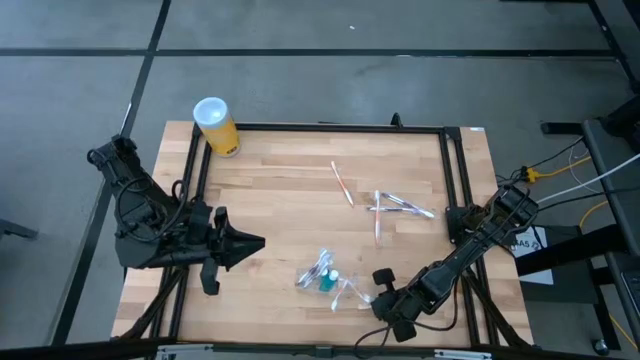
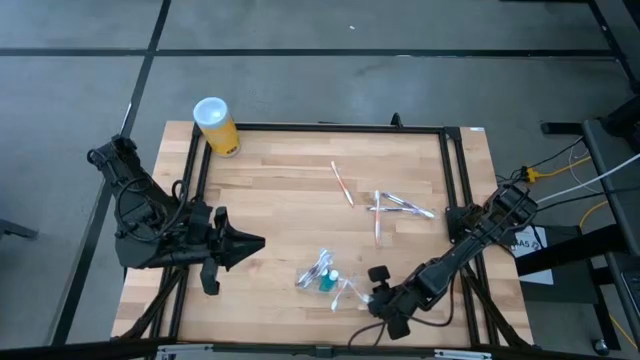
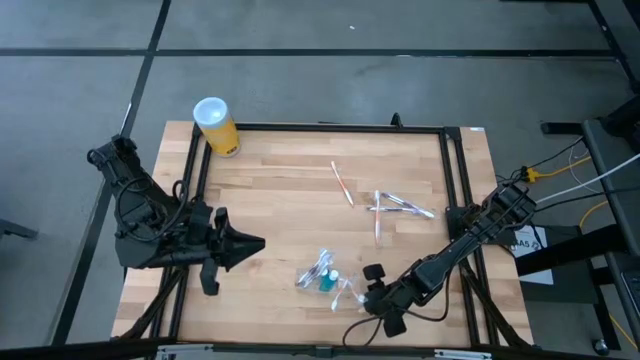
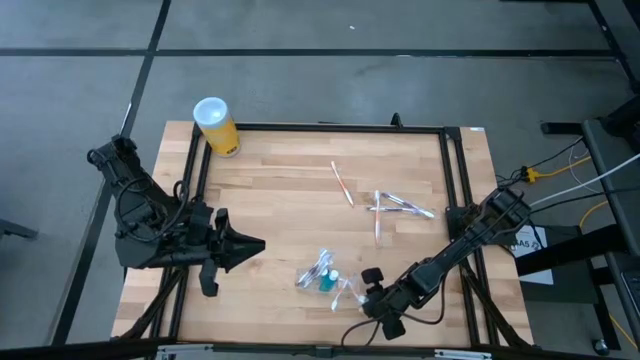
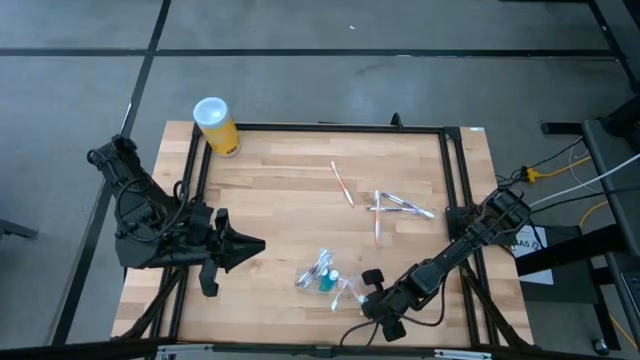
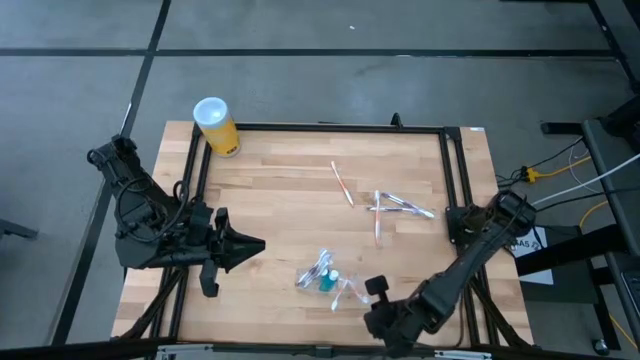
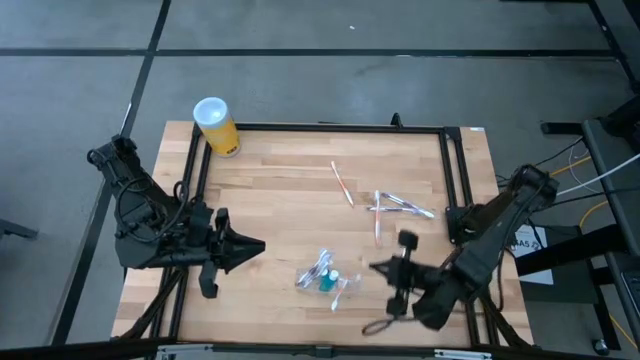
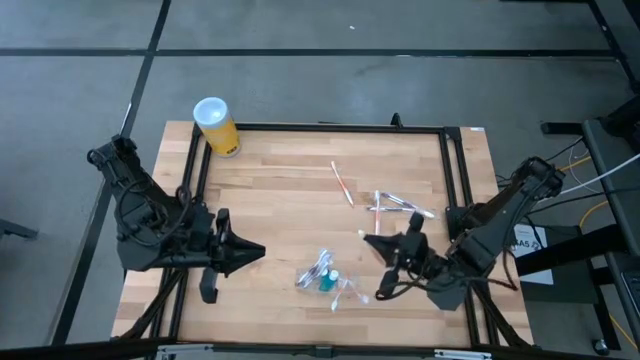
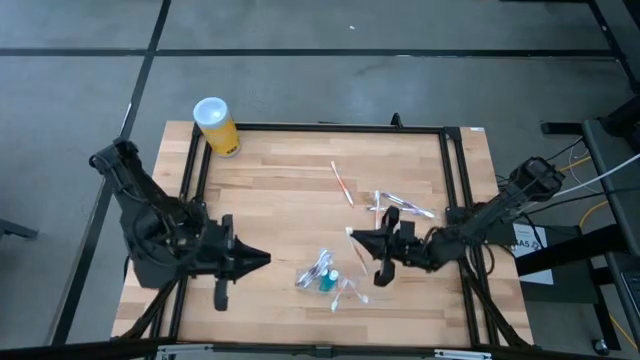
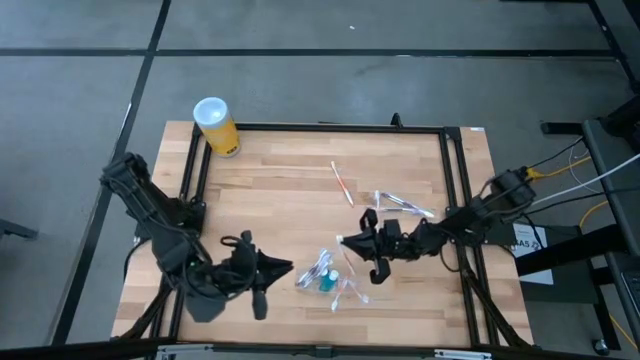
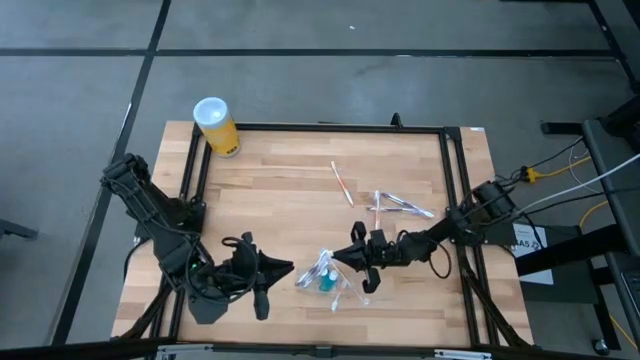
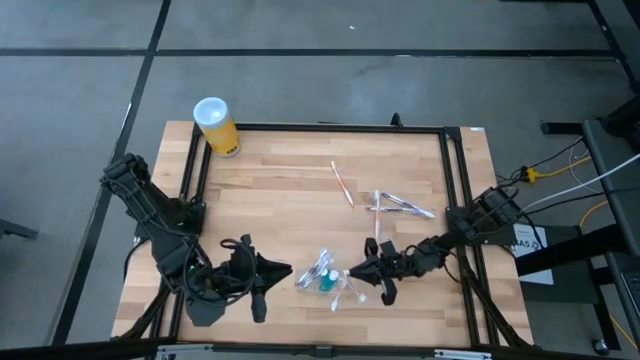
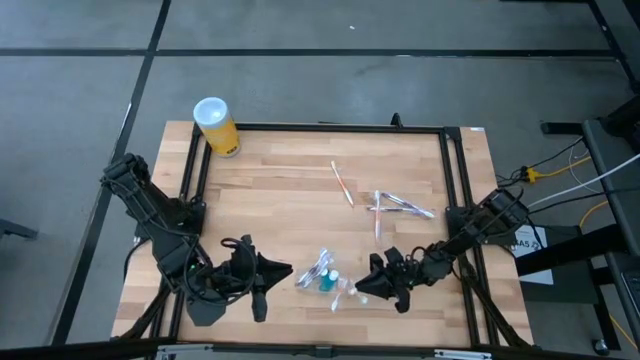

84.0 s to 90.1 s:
Task: Pick & Place toothbrushing station
Put the orange toothbrush into the right section of the transparent organizer

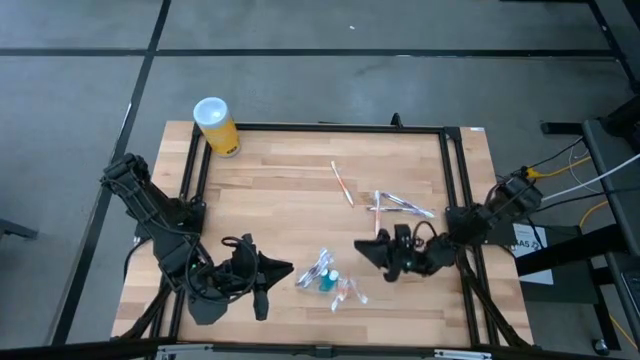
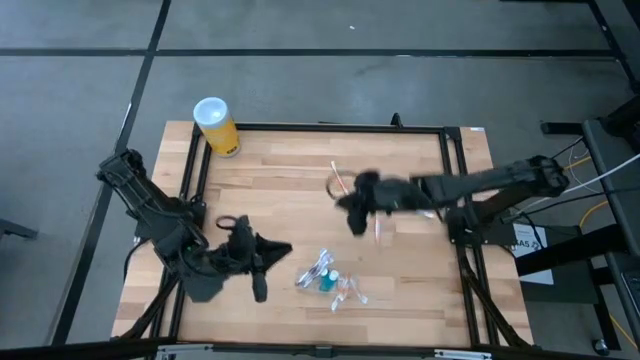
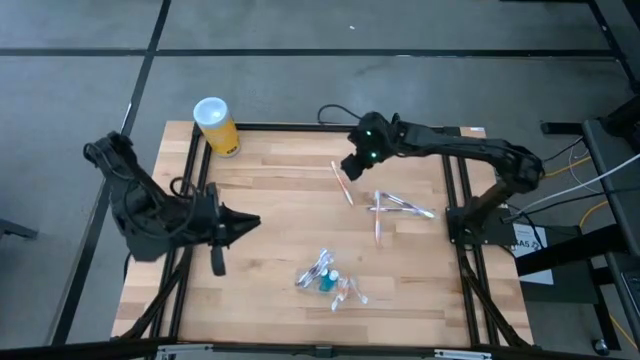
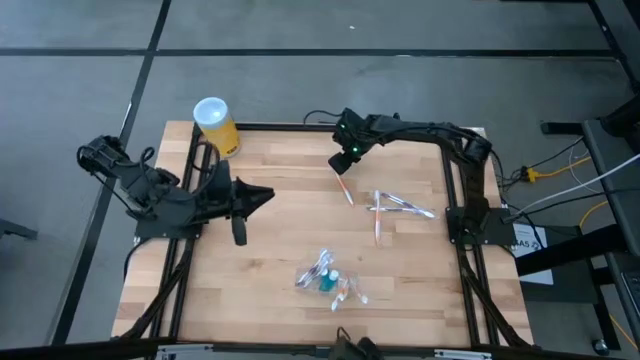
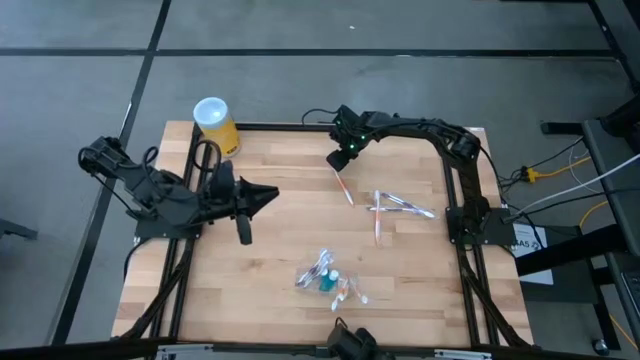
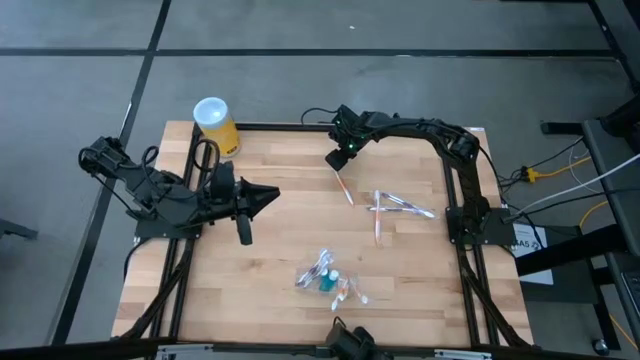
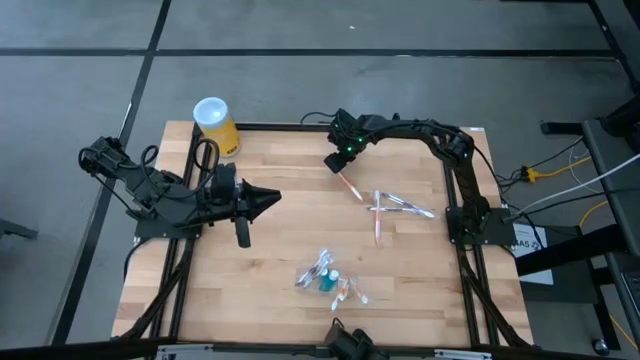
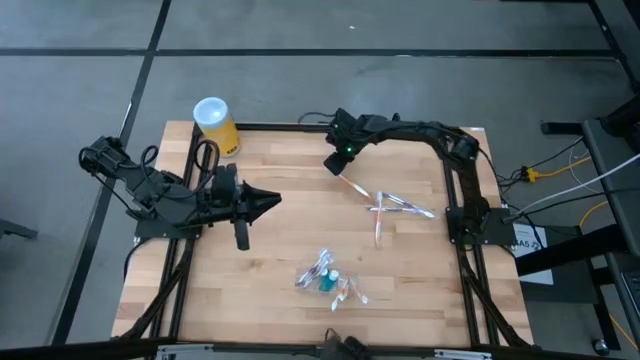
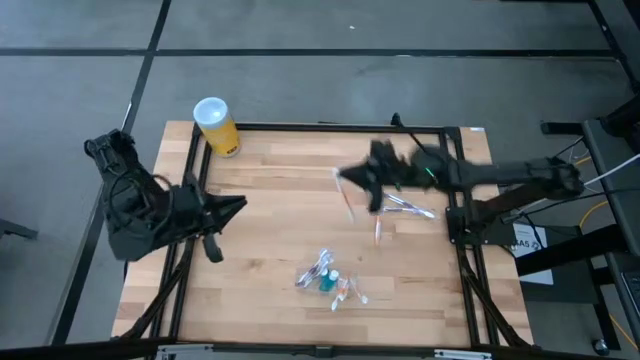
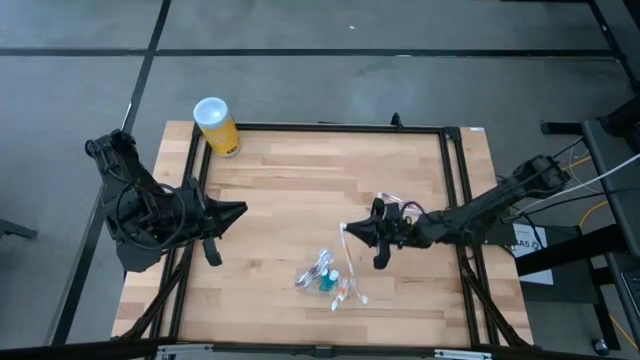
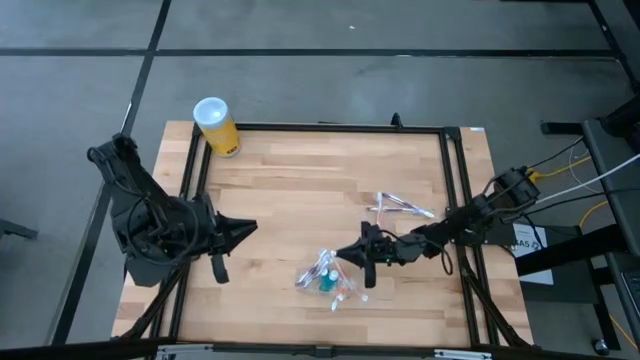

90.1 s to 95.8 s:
Put the orange toothbrush into the right section of the transparent organizer

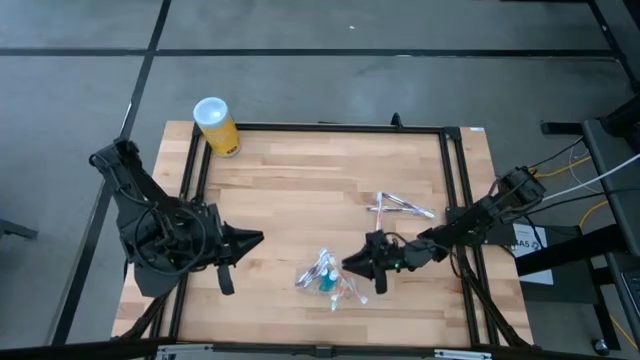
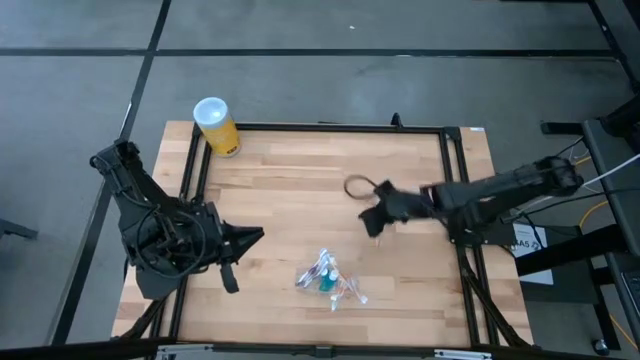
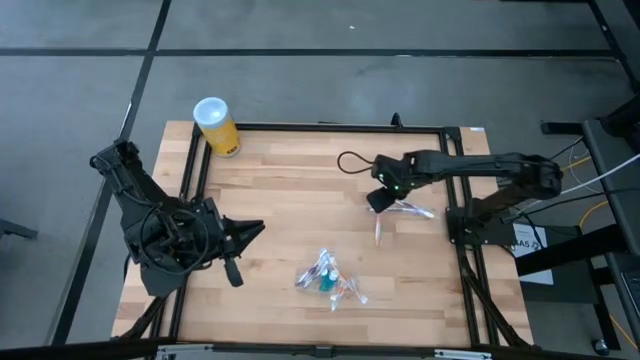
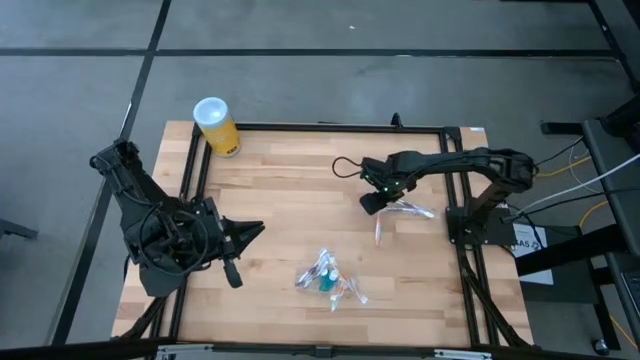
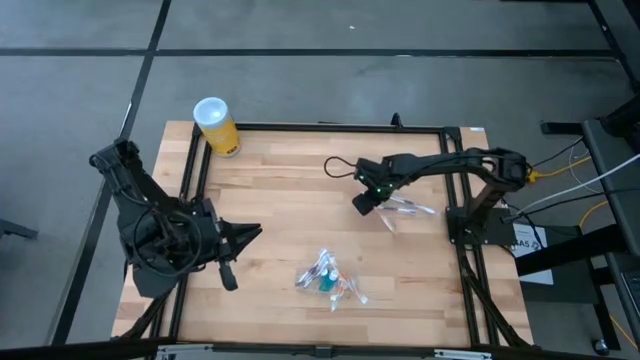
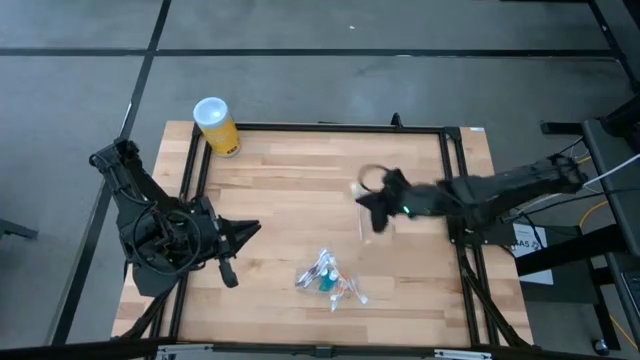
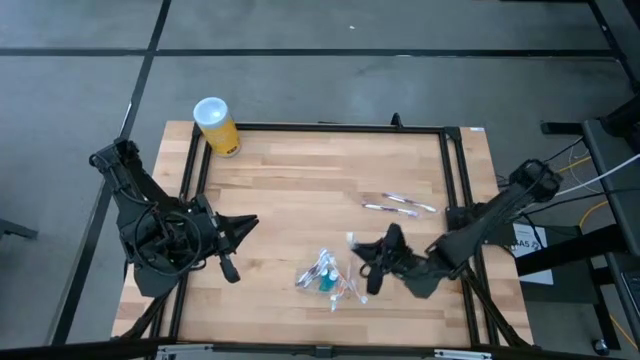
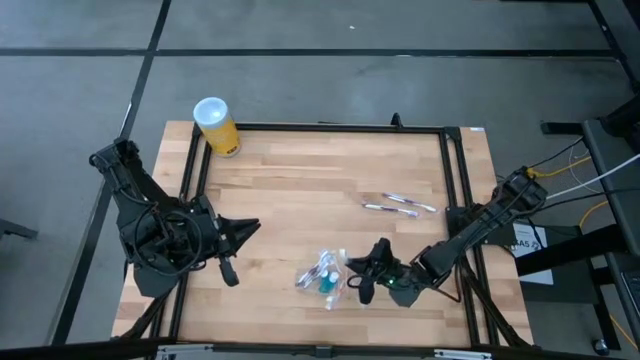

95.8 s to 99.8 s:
Put the orange toothbrush into the right section of the transparent organizer

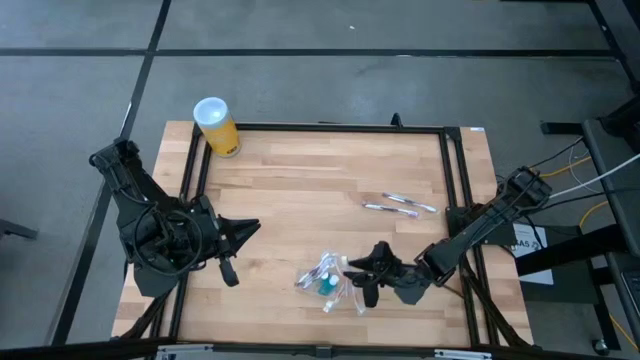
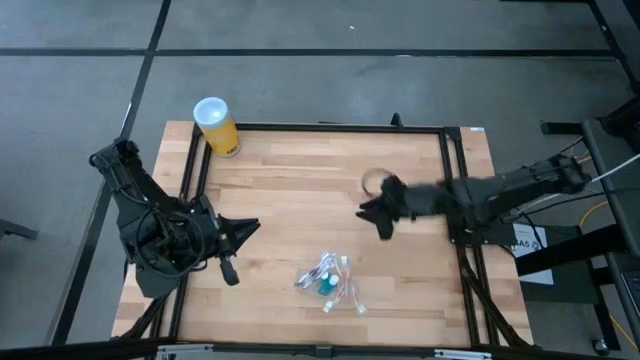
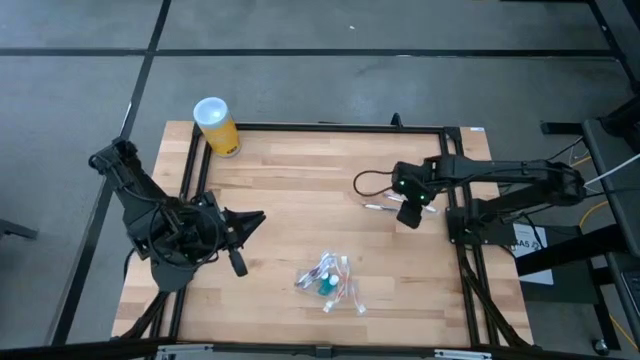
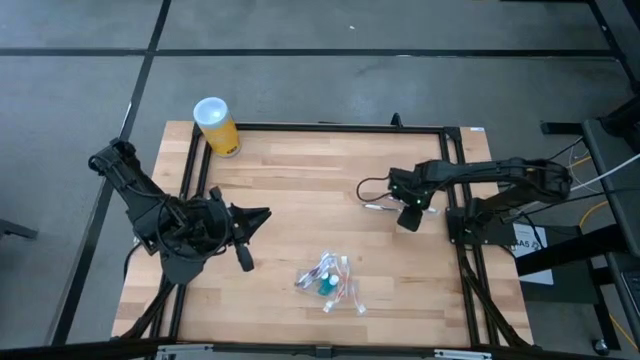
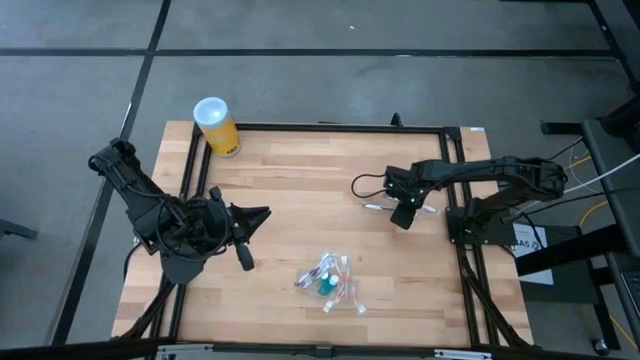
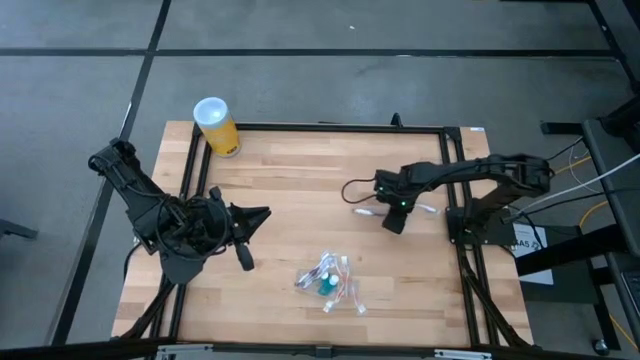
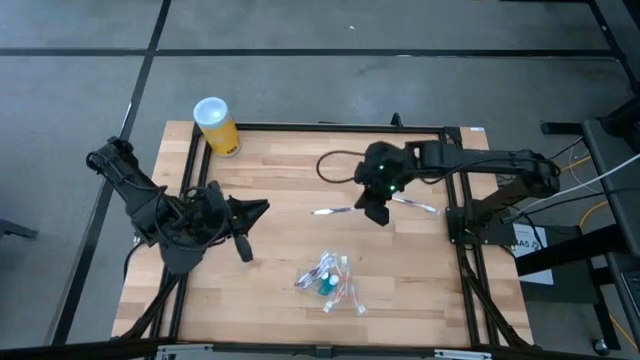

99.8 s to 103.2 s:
Put the purple toothbrush into the left section of the transparent organizer

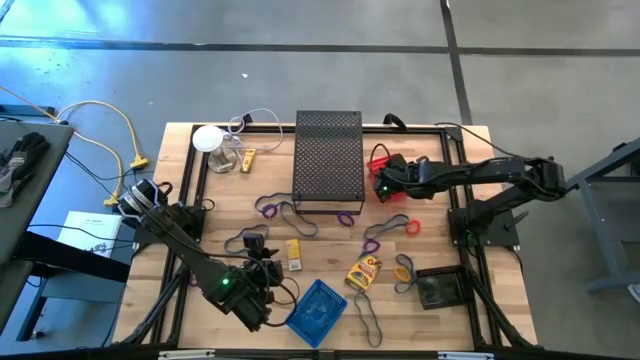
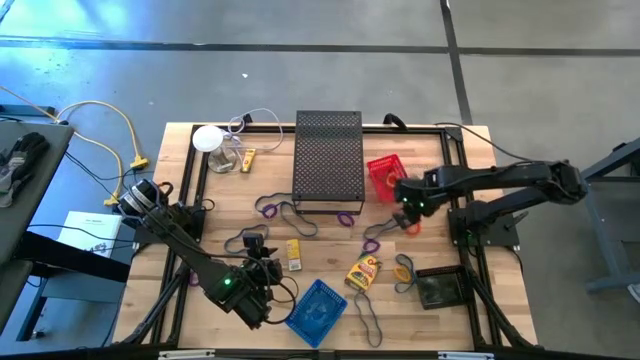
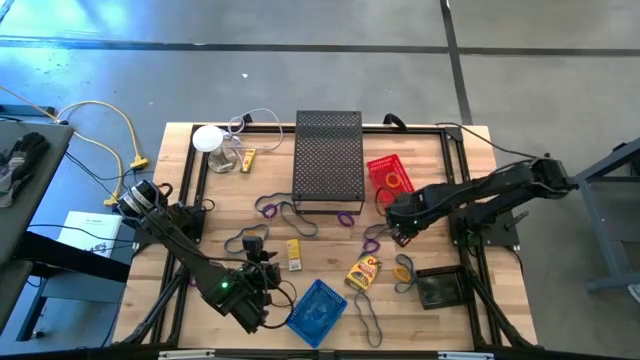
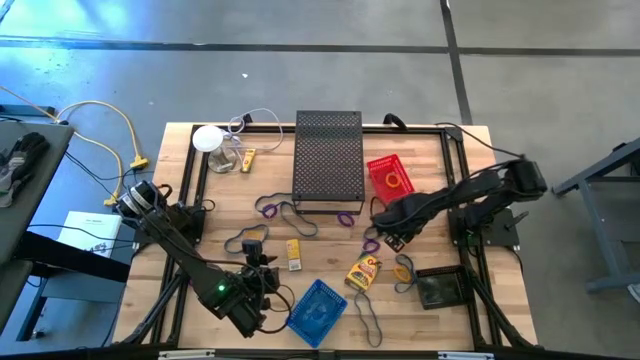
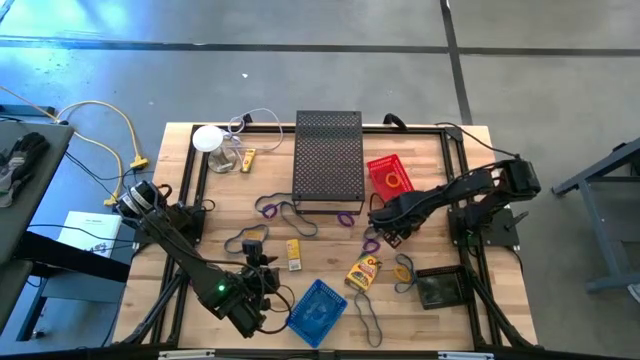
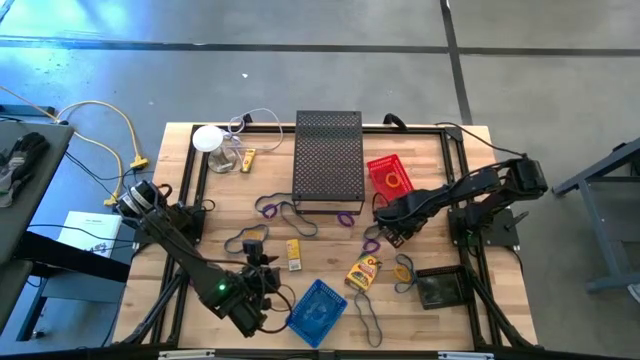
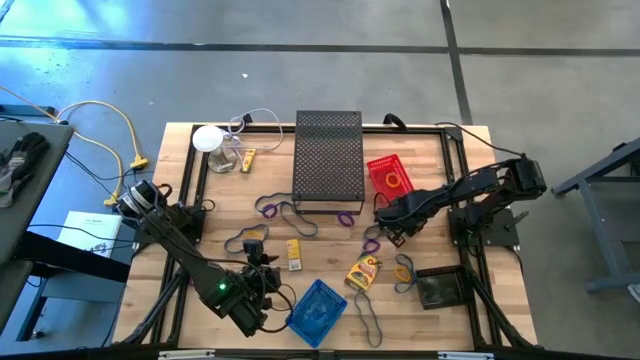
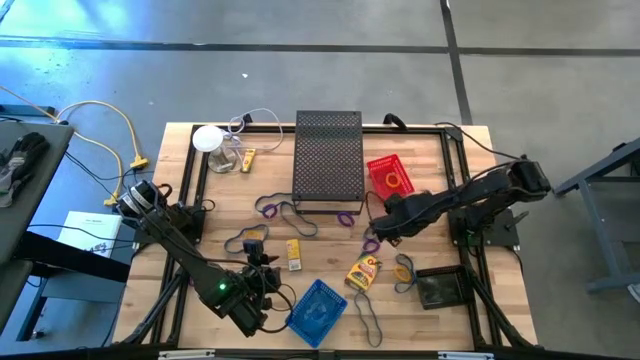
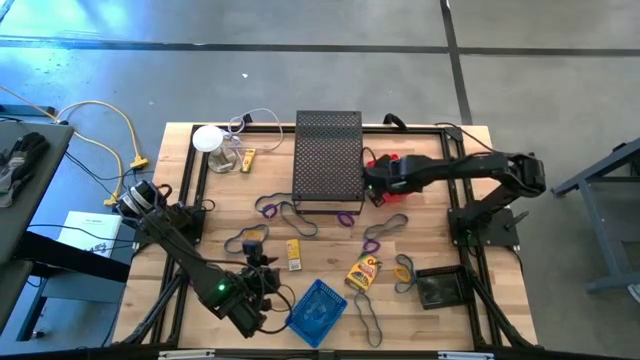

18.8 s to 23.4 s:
Task: Pick & Place Office Desk Supplies
Put the orange spring keychain into the red bin
